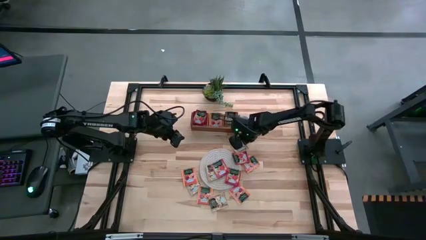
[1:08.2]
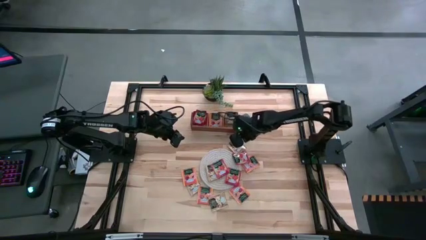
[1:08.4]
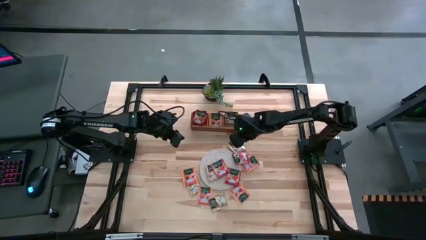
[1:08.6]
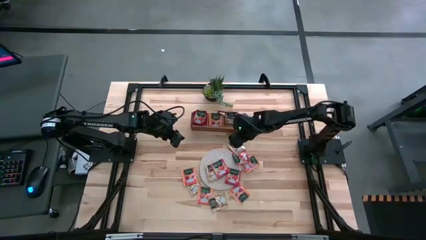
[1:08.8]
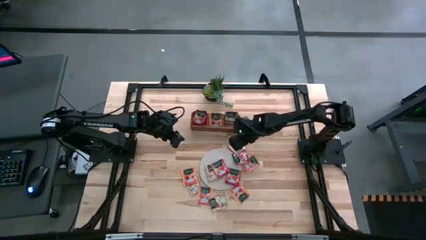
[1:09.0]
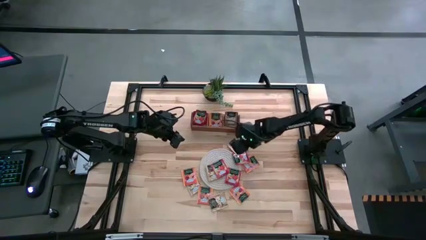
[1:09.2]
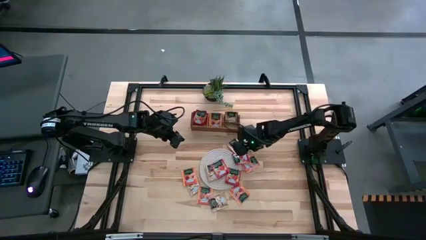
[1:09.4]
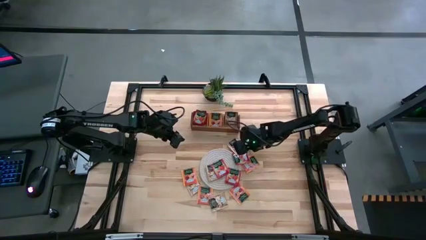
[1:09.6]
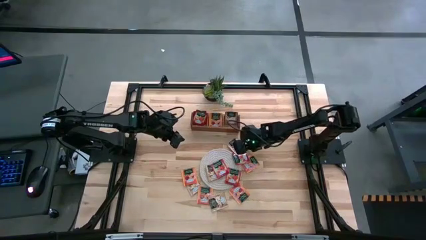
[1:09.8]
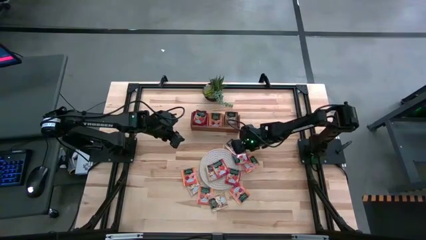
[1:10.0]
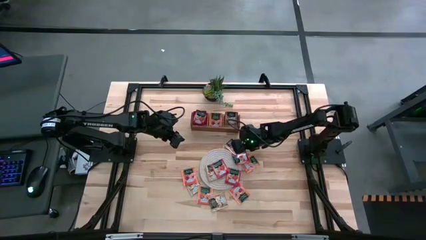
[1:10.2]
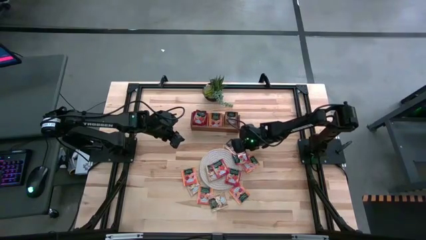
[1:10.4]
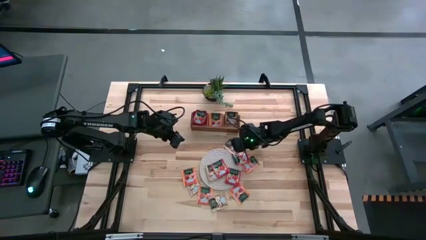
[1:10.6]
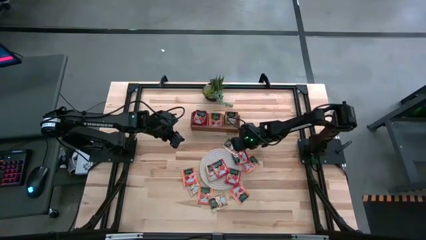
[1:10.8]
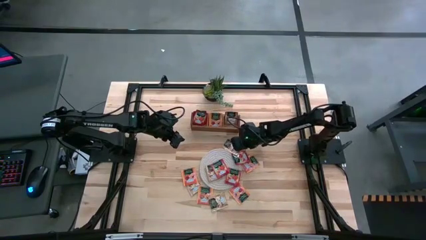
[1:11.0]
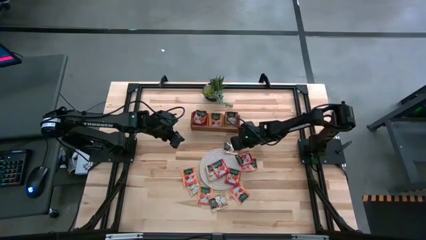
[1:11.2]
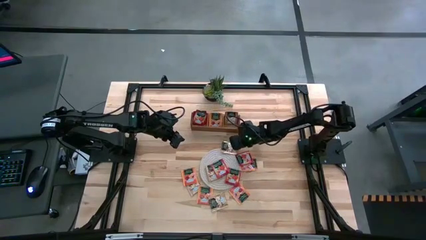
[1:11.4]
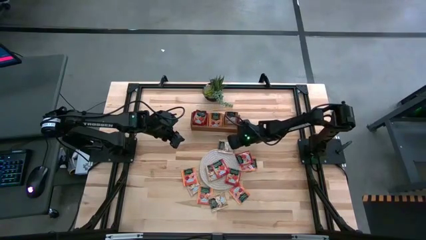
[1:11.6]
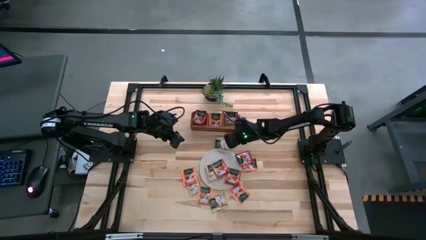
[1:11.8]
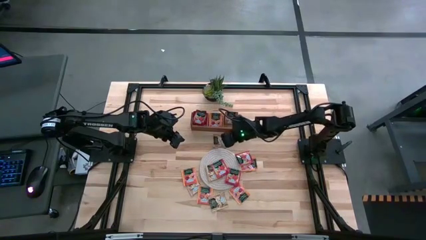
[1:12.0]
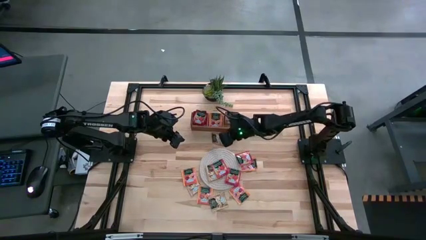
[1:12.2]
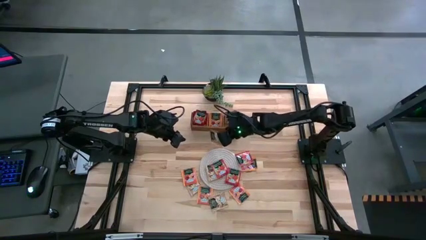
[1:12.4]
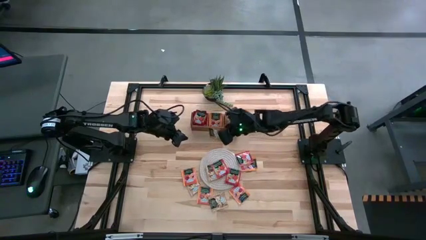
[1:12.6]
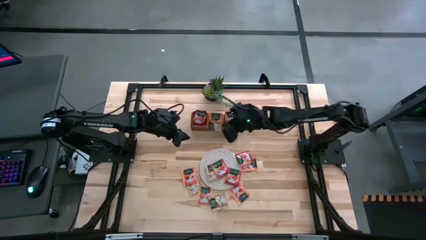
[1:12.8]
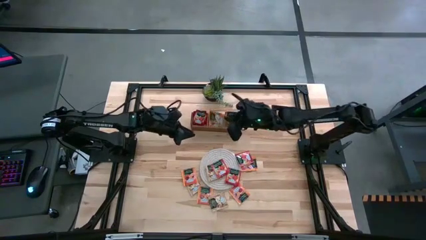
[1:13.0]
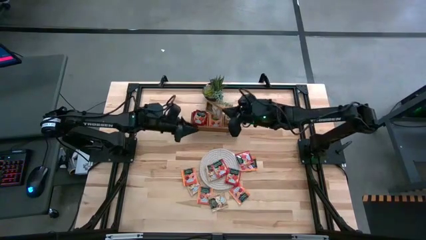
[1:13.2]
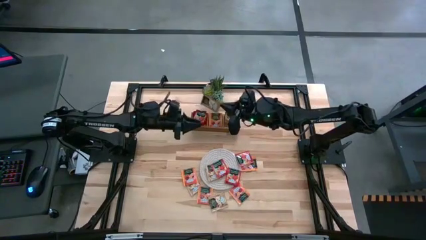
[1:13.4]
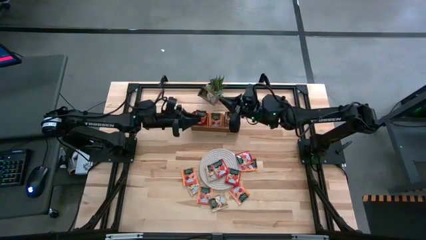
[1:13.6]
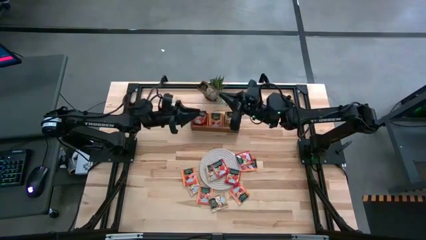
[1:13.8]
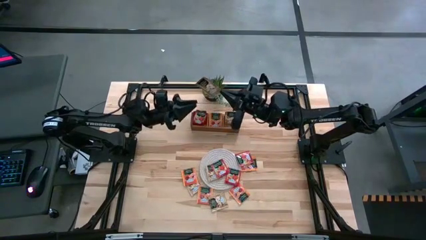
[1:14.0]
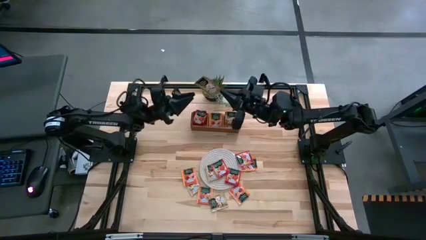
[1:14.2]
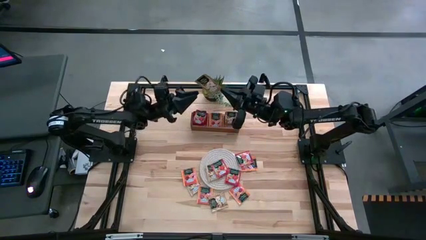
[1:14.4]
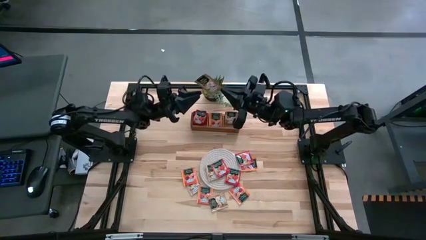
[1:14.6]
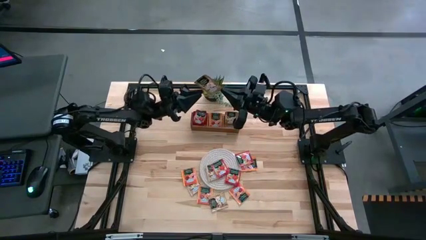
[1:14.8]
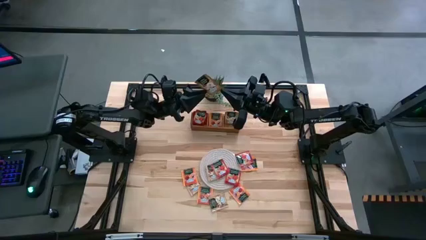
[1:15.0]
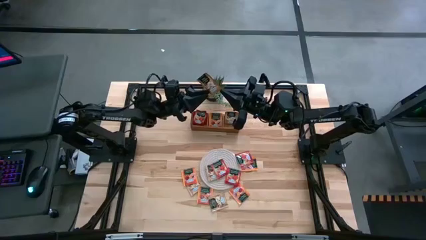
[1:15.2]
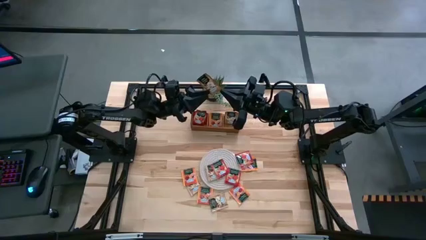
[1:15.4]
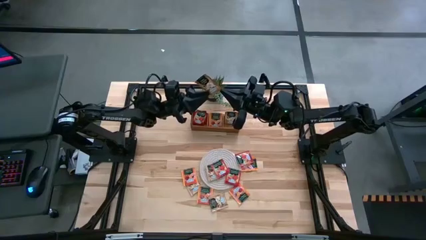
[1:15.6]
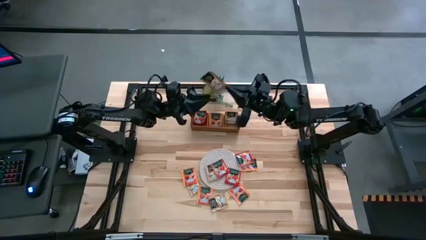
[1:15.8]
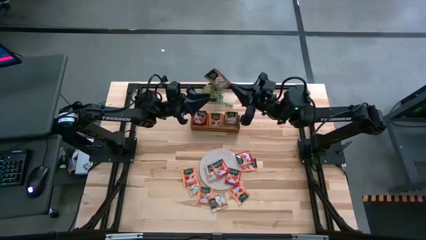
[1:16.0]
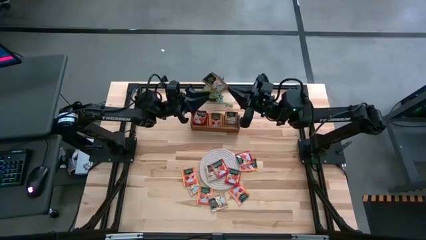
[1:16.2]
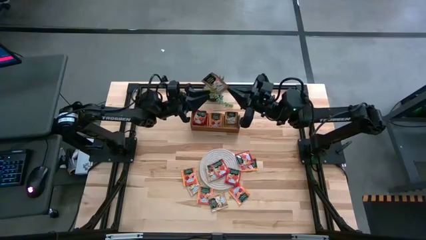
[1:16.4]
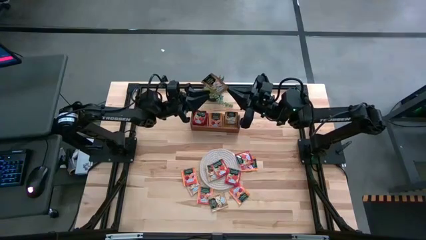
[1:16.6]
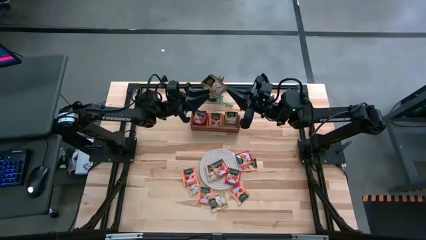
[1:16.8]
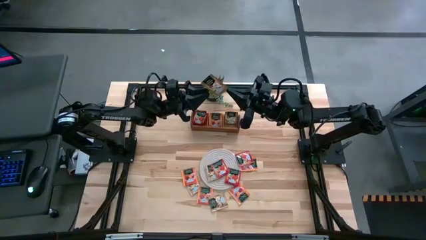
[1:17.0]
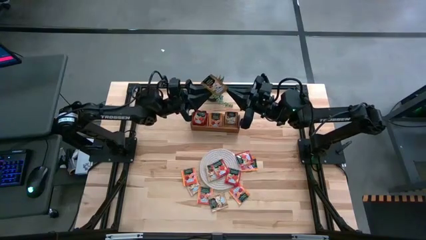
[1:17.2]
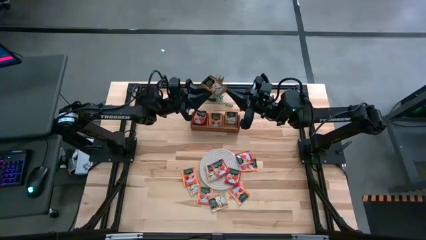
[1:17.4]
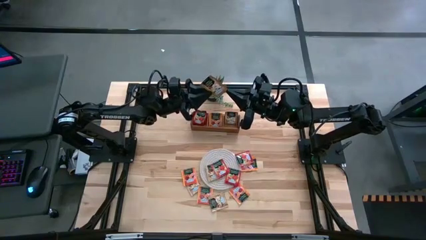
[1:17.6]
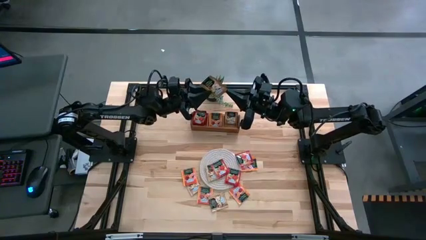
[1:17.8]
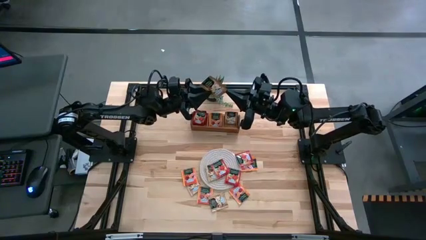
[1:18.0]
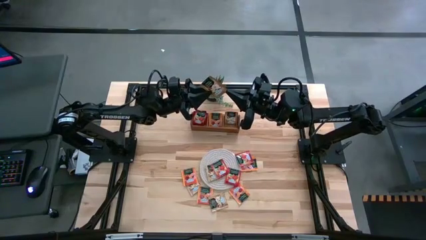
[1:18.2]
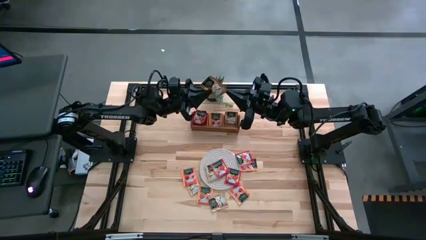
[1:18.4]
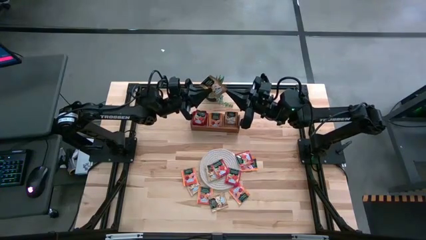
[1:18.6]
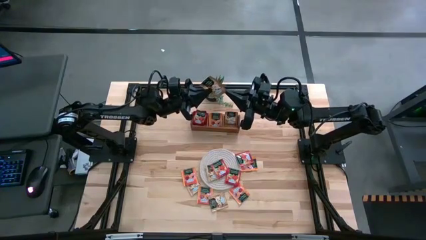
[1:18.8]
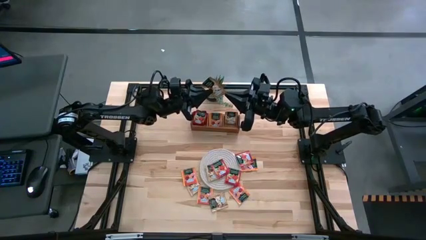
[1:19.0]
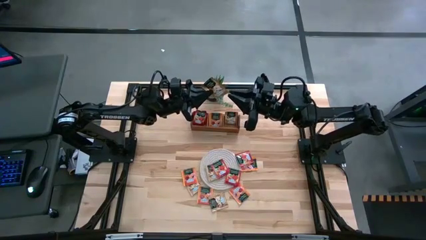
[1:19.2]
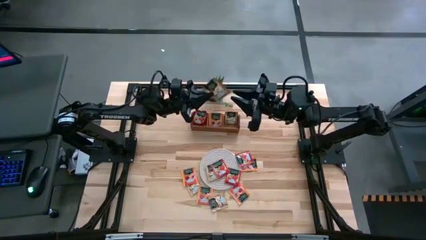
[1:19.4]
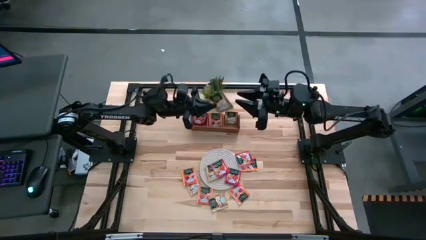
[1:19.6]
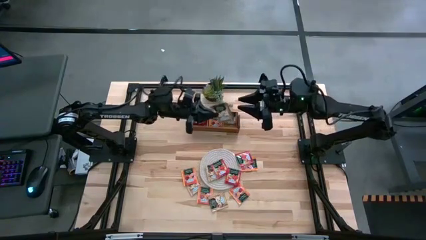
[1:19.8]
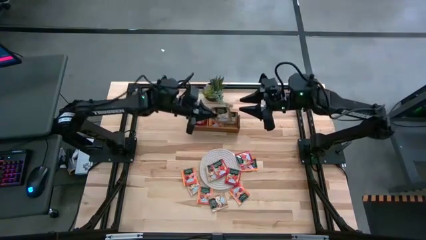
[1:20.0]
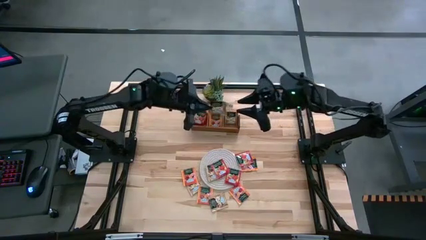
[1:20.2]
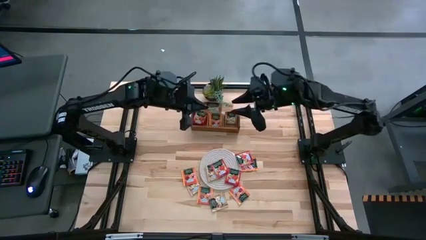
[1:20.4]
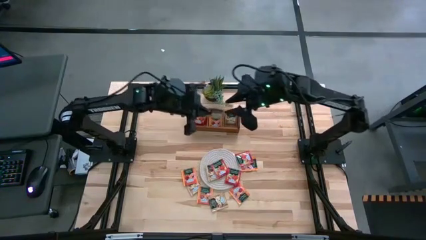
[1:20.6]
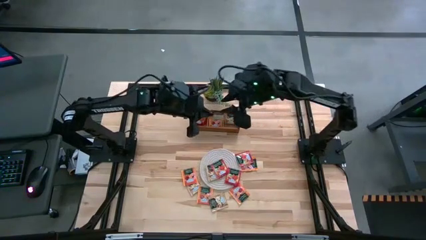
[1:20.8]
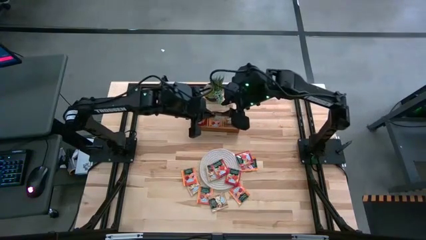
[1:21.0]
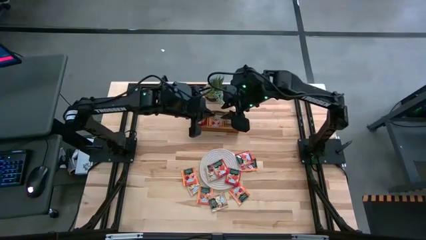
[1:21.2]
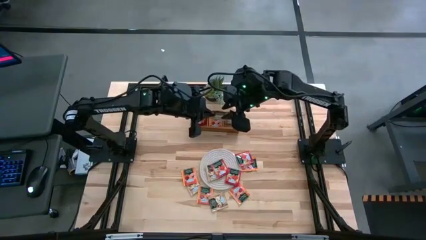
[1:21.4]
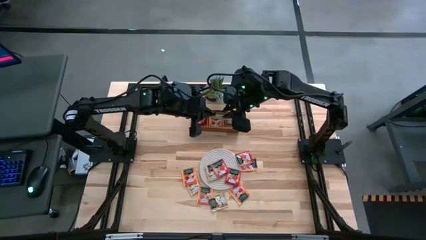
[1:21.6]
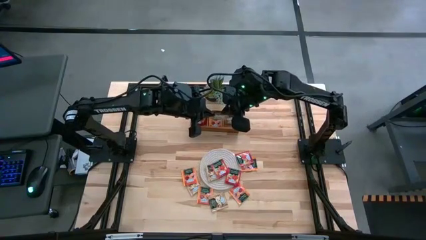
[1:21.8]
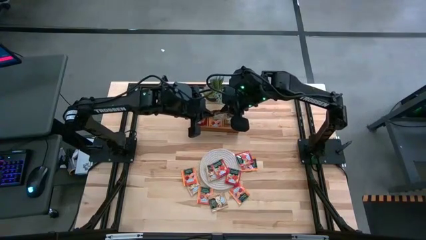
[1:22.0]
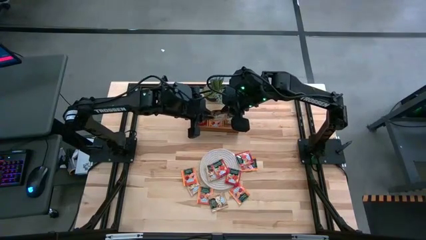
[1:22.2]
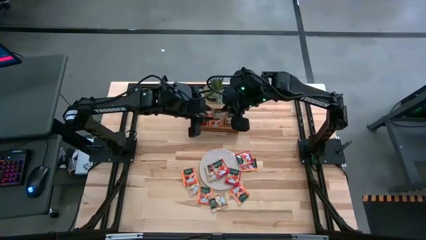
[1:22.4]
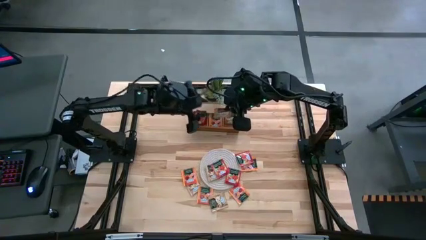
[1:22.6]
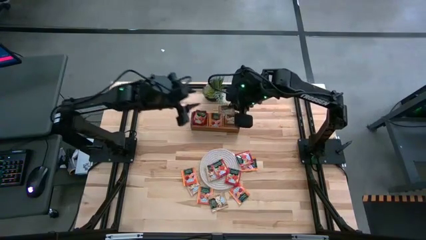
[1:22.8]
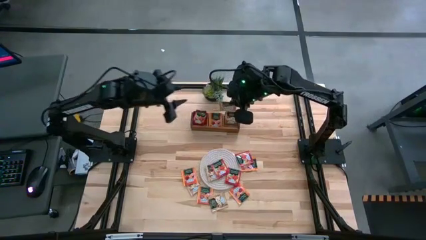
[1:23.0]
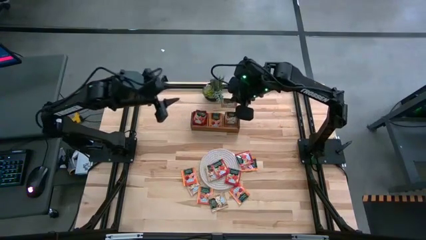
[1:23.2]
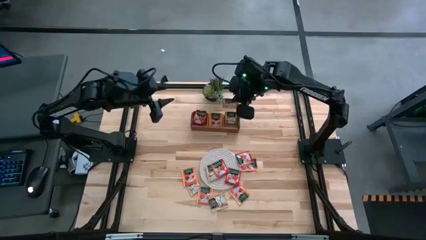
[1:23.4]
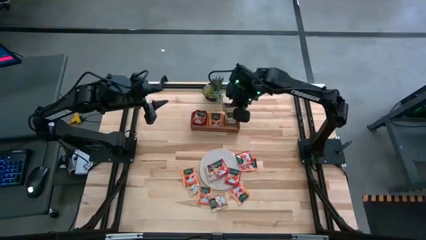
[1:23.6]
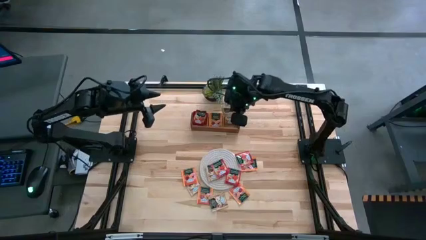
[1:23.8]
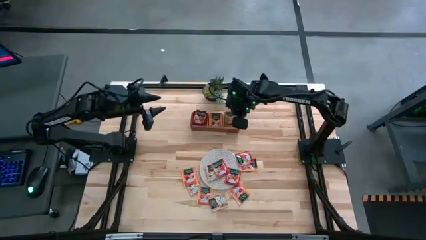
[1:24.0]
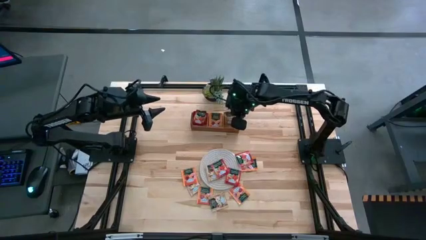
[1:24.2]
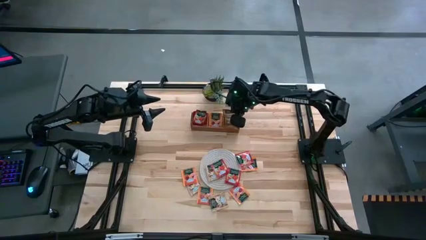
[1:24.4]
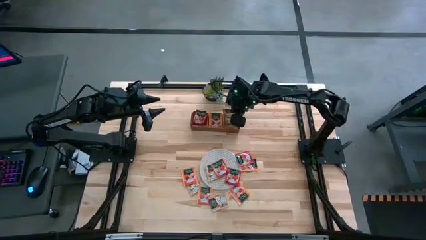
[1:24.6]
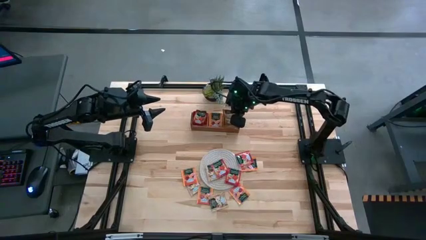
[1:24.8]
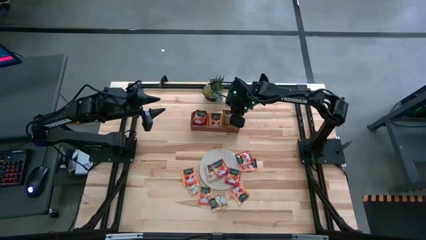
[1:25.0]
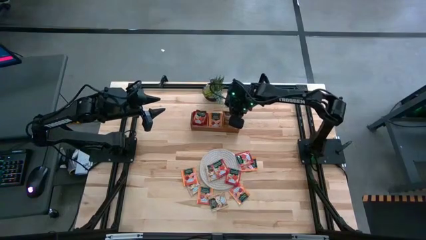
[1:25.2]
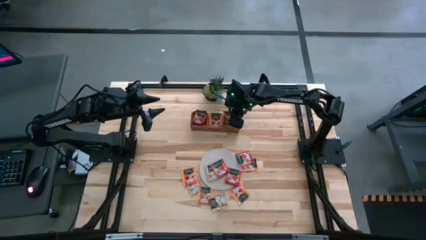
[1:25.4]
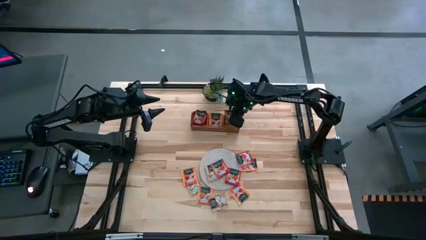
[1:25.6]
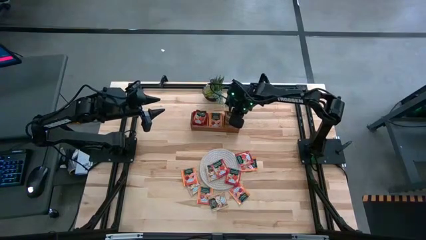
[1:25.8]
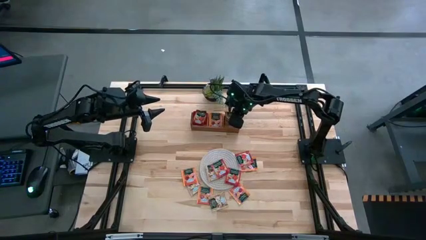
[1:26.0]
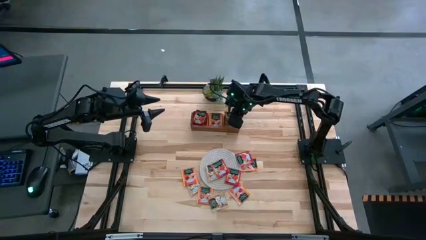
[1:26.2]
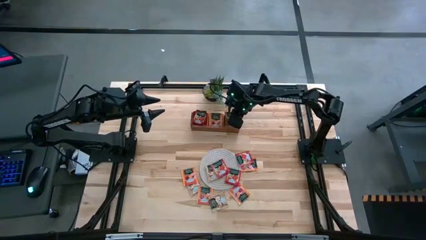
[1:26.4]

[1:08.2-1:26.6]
Task: Pick & Place Tea
Put the light brown tea bag into the right section of the wooden organizer
